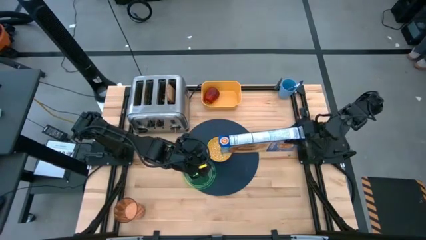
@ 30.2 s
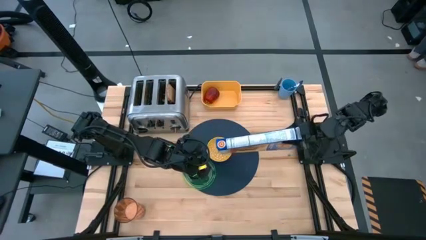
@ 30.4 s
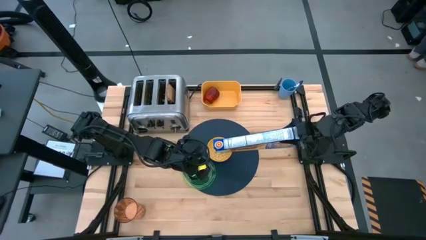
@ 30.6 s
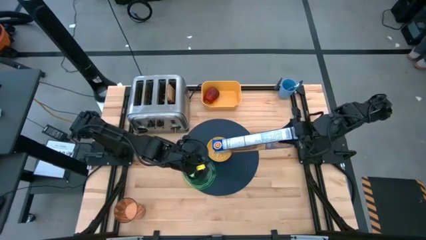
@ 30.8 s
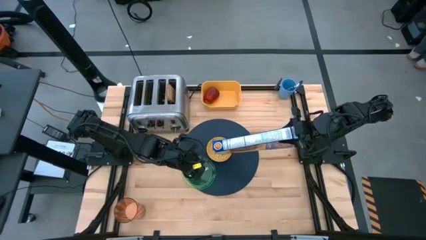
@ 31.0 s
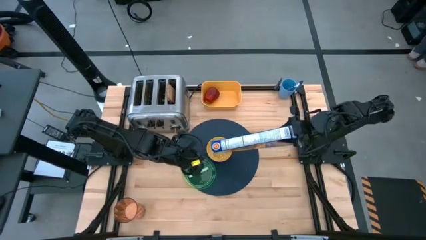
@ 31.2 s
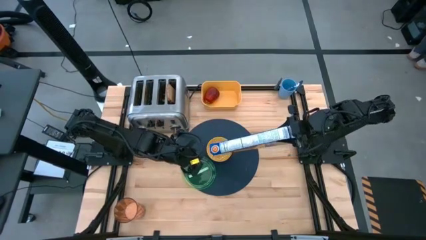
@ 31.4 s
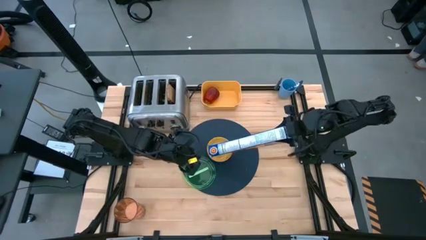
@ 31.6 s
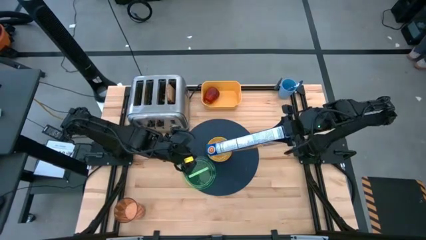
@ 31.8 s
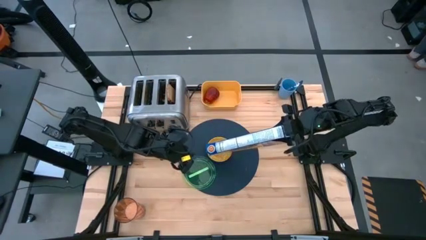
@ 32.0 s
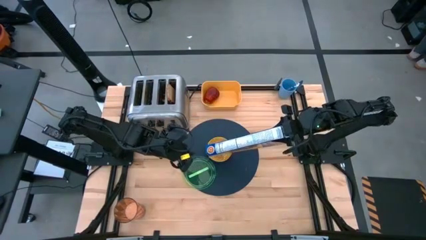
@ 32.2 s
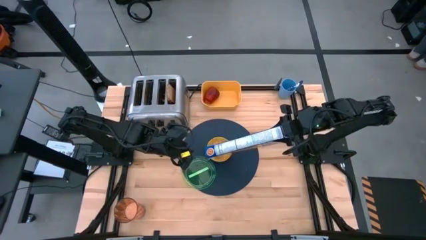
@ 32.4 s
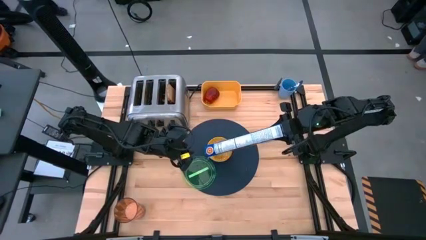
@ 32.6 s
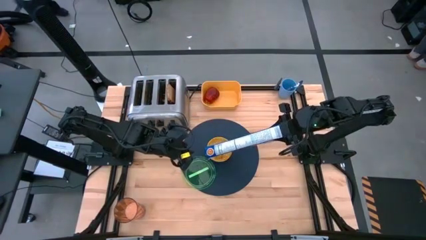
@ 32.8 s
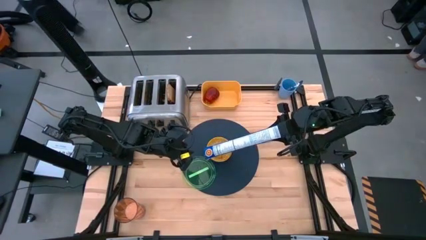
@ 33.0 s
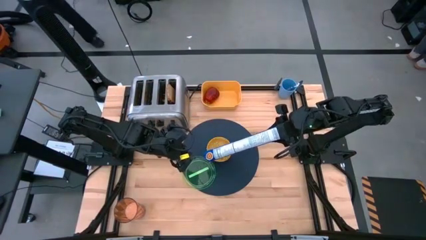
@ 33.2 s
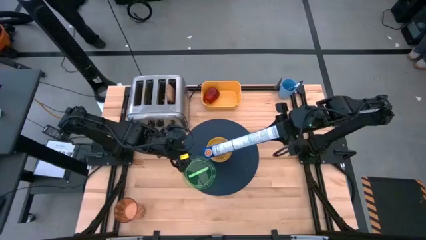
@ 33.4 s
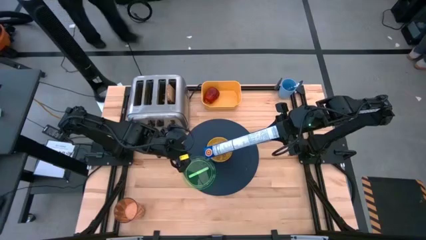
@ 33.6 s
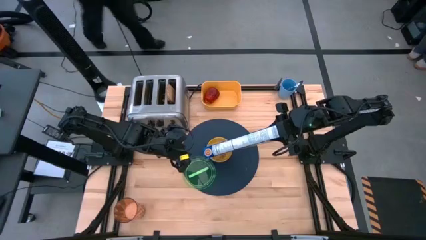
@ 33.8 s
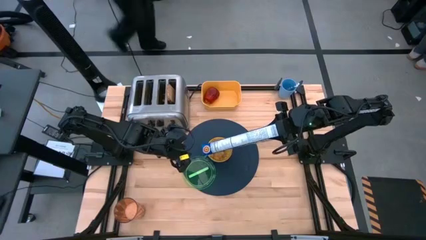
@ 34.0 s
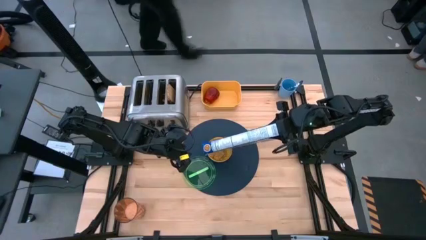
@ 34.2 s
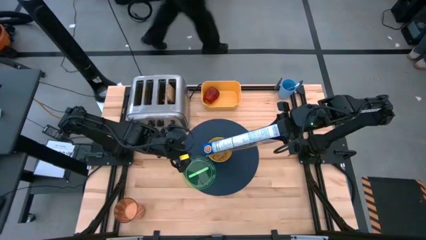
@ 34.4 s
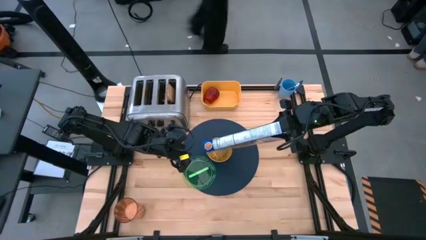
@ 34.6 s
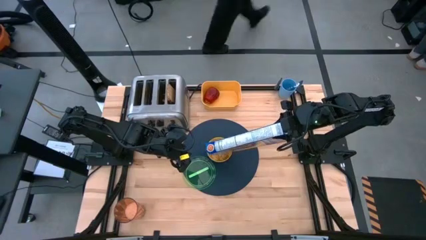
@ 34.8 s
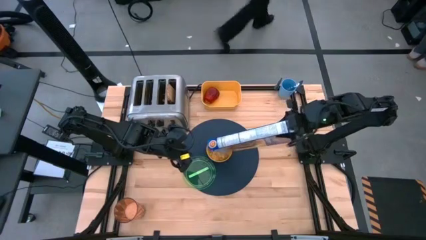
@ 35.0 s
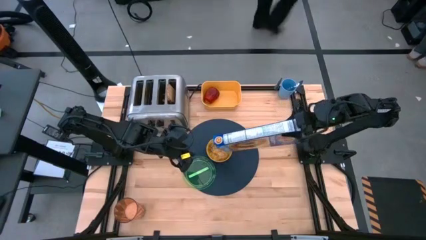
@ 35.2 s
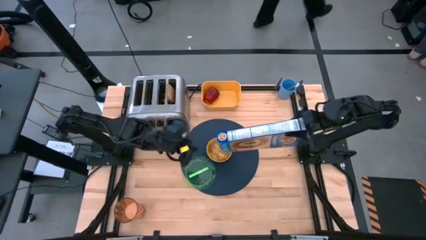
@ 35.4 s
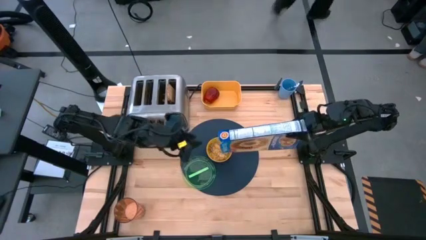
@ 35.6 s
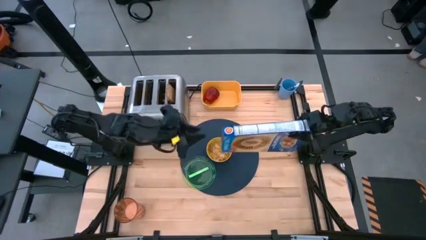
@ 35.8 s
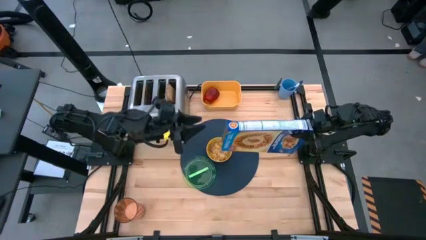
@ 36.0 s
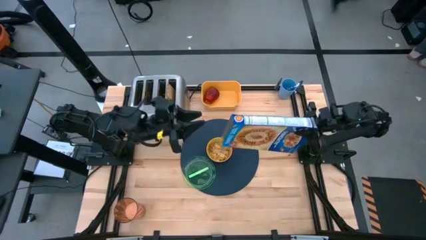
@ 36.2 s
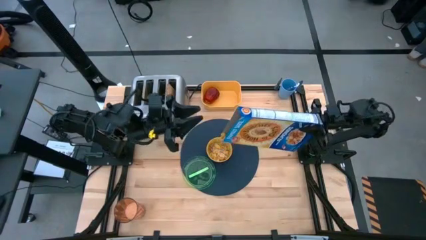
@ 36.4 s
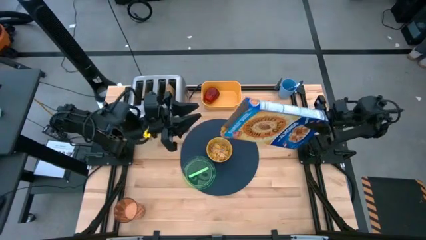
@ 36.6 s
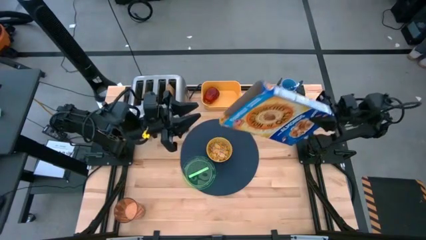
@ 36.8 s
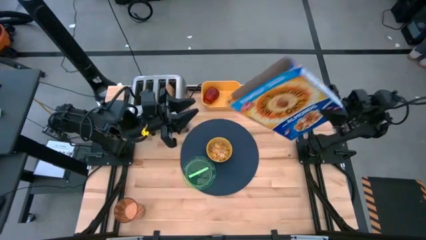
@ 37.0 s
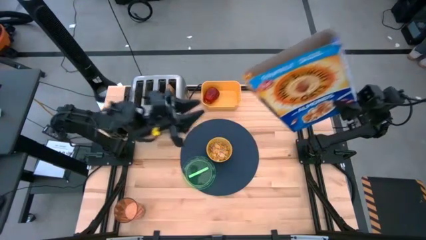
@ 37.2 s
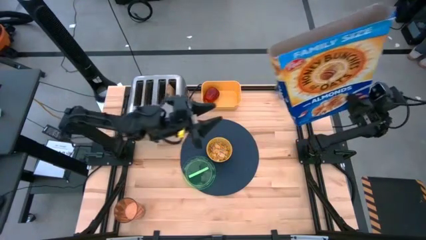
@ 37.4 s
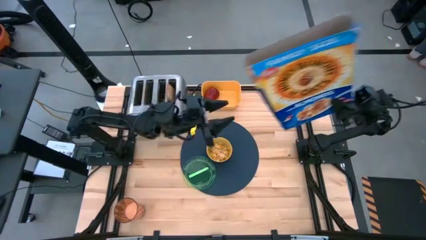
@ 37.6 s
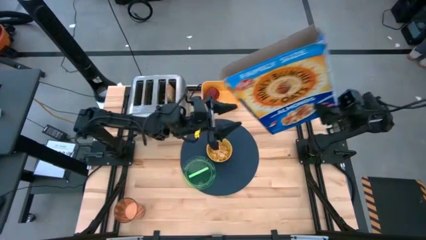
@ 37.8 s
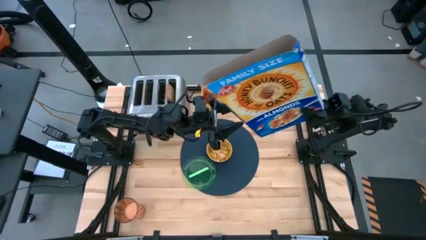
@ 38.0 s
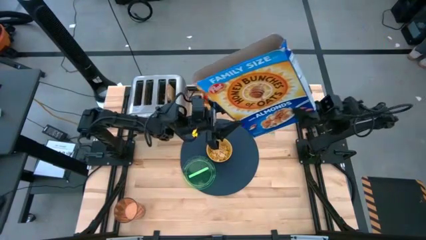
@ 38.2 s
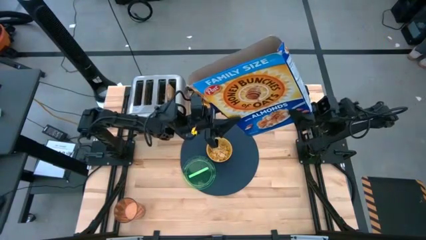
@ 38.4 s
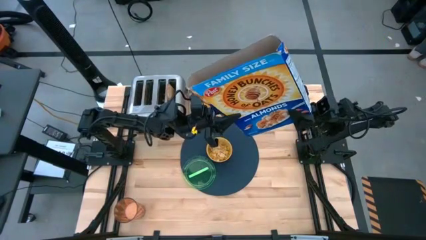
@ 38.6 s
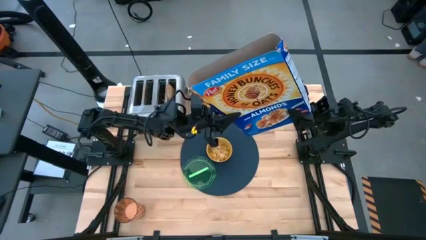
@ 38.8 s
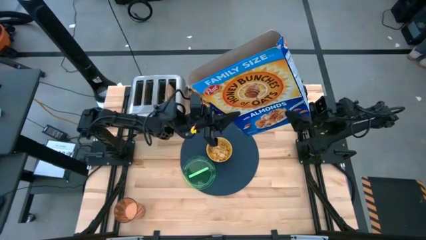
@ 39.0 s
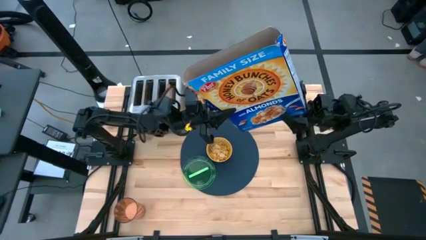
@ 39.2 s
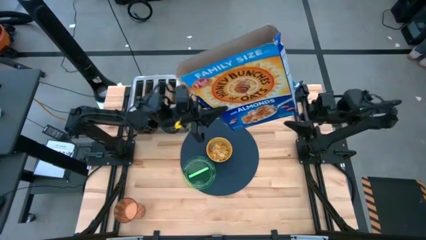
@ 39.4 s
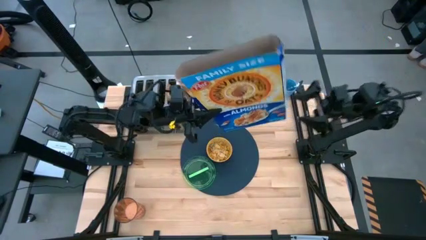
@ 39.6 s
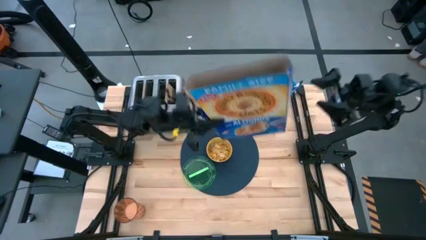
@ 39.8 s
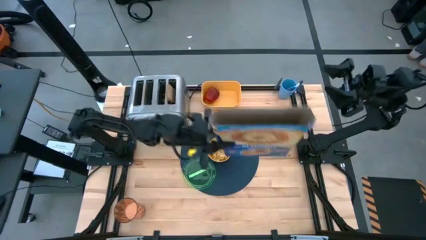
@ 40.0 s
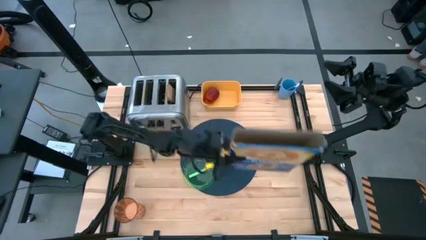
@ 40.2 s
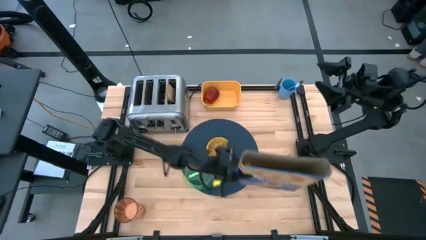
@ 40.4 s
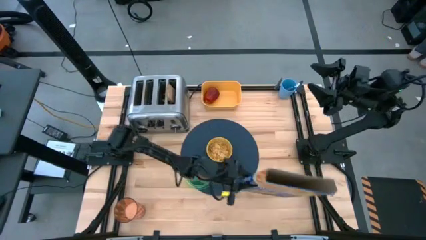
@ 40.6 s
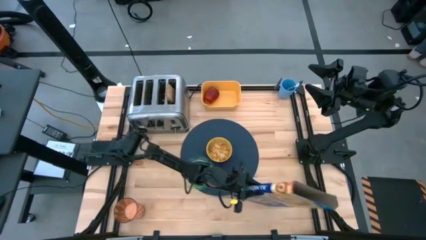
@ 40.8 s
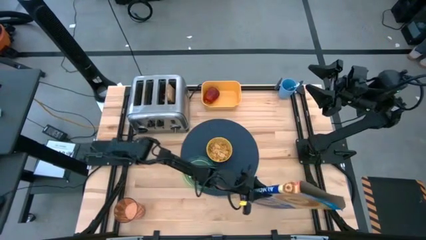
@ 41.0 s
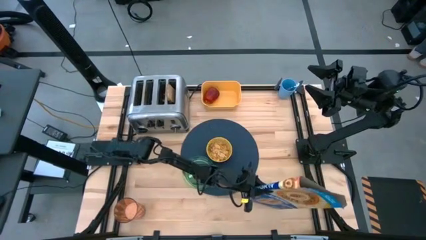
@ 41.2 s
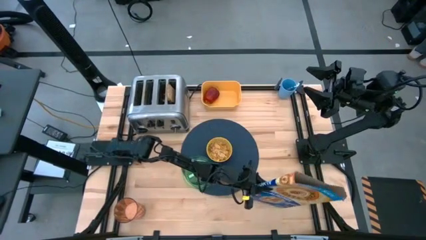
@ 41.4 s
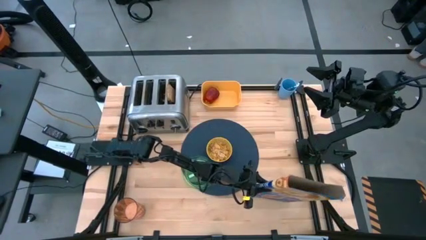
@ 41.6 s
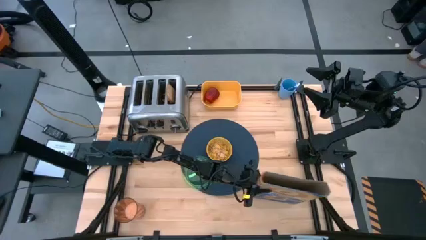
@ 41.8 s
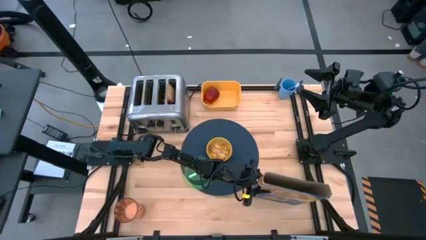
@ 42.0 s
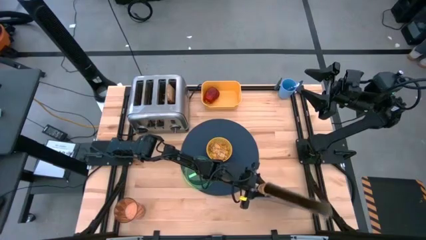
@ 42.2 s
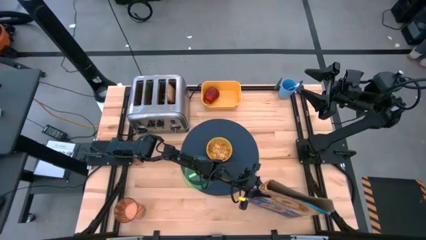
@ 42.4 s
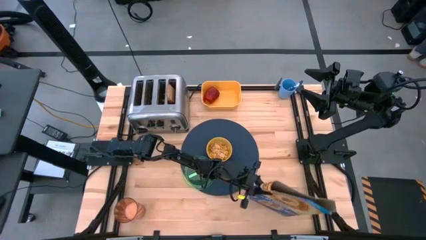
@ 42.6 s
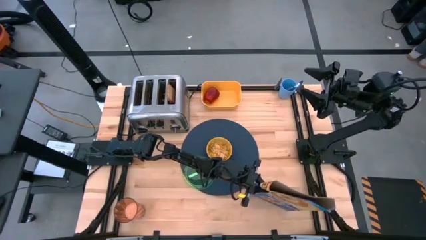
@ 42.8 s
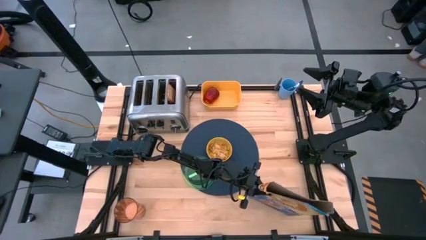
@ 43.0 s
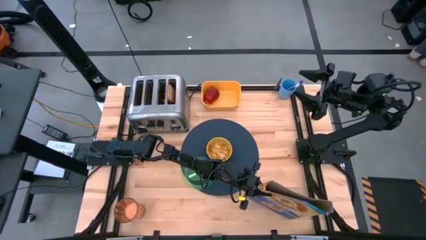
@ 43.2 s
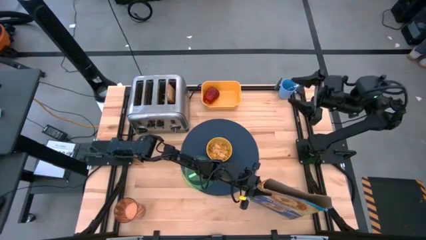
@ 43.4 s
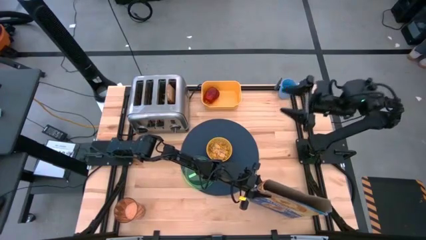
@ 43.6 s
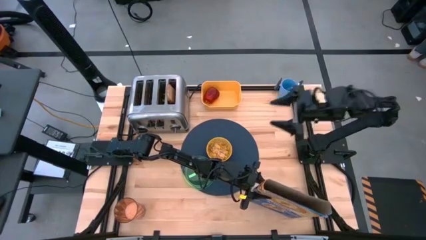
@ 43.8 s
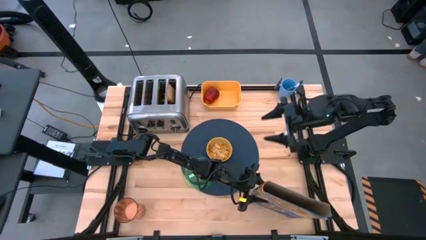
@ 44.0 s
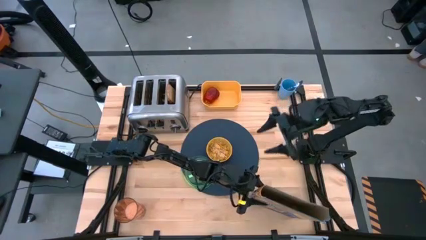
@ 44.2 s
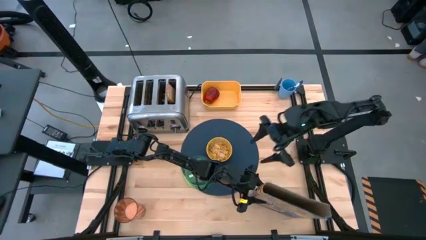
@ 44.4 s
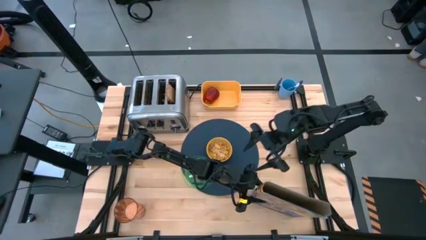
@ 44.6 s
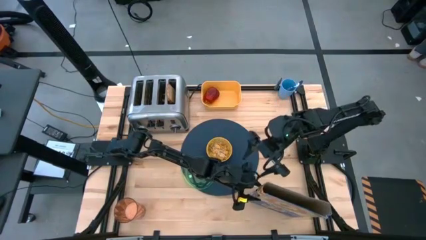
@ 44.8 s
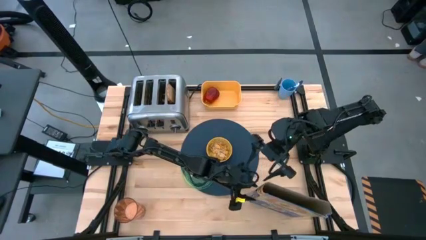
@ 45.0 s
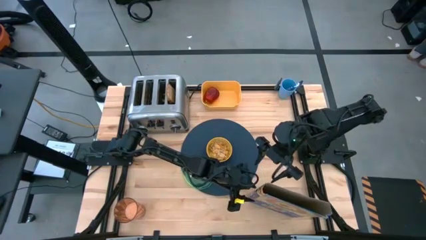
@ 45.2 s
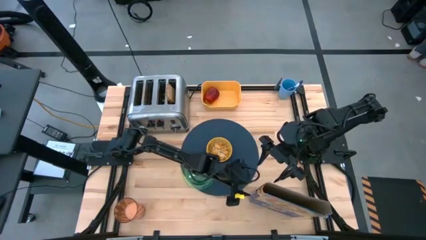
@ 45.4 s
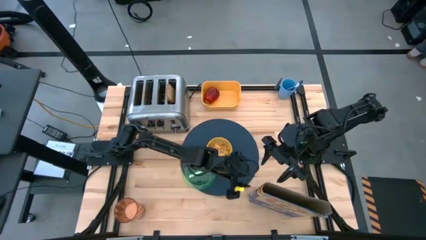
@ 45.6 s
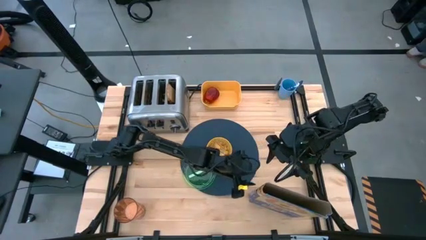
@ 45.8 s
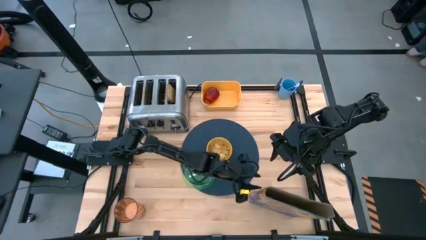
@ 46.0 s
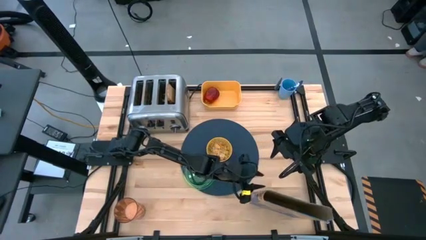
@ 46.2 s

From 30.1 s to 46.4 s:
Task: Arrange a breakfast setting
Pour the cereal from the blue cereal box into the yellow bowl

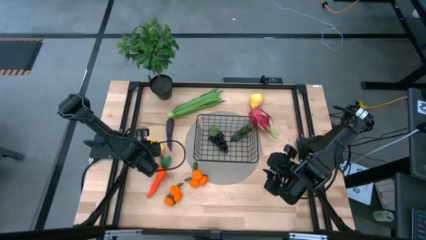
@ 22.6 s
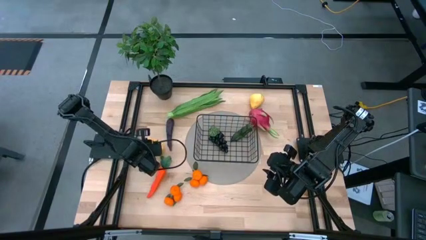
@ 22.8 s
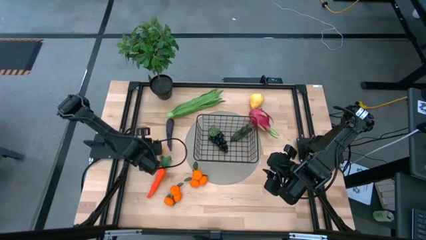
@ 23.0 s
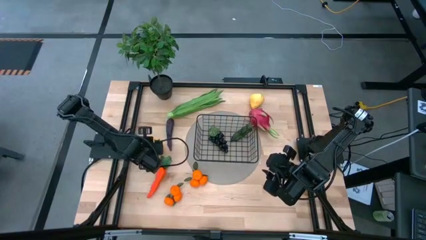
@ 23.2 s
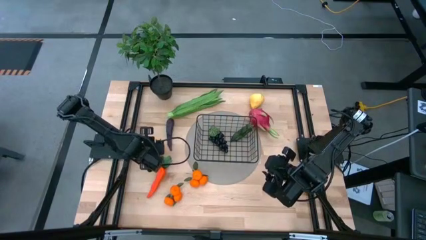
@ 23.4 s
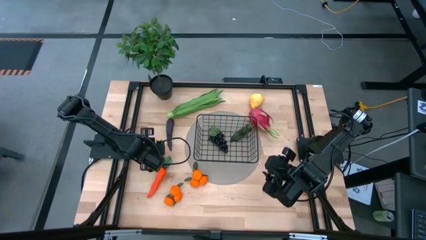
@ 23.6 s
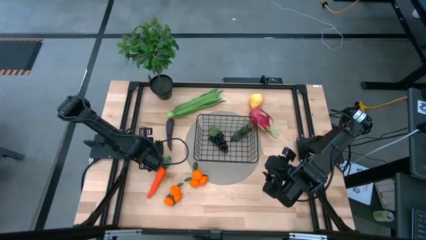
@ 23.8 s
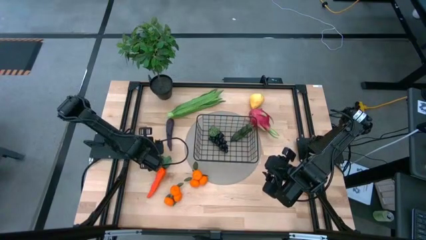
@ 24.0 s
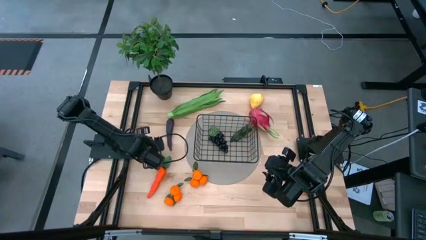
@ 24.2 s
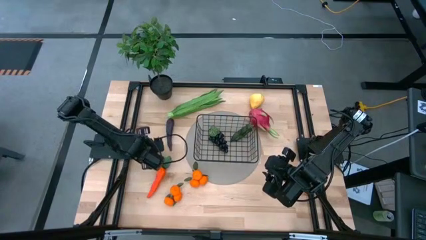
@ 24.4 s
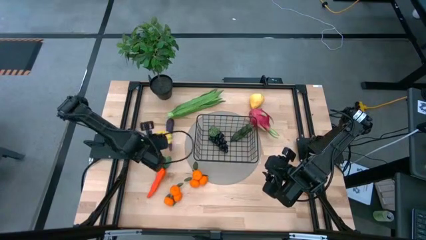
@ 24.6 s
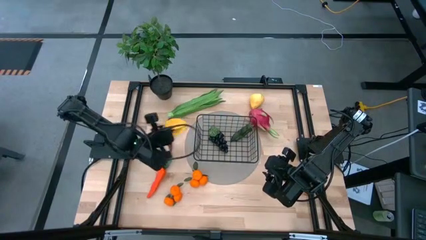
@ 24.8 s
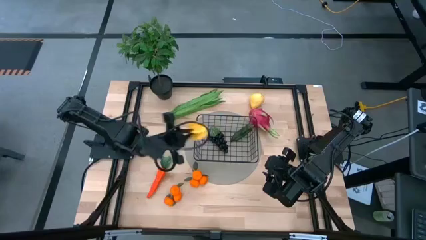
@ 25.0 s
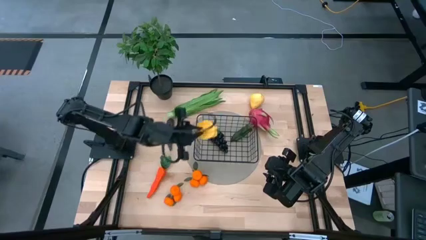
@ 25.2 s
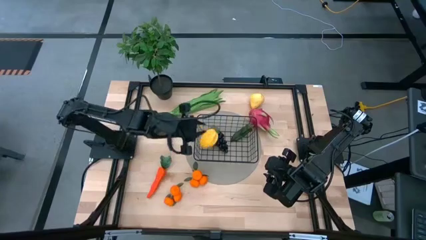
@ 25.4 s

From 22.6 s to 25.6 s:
Task: Build produce basket
Put the yellow star fruit into the black wire basket
